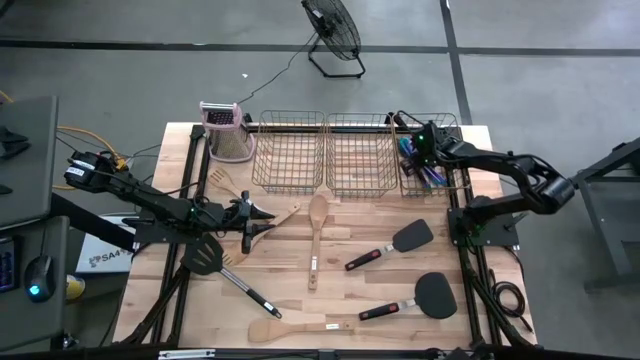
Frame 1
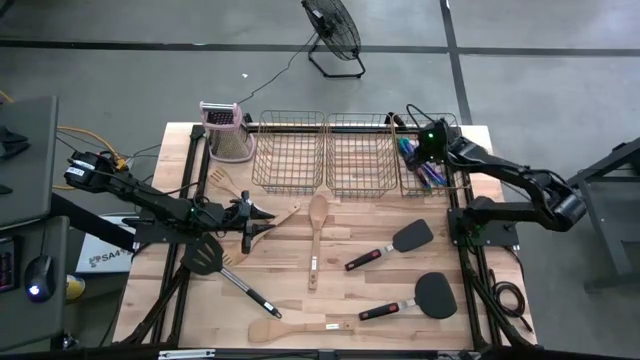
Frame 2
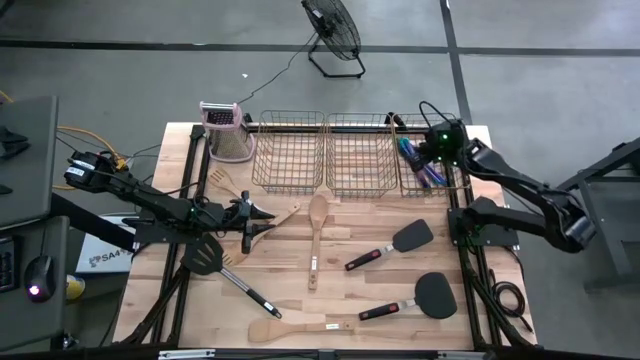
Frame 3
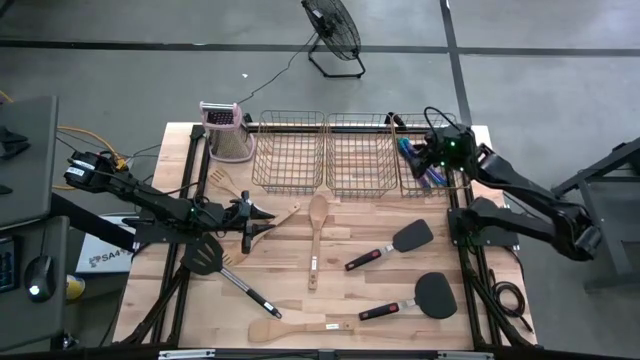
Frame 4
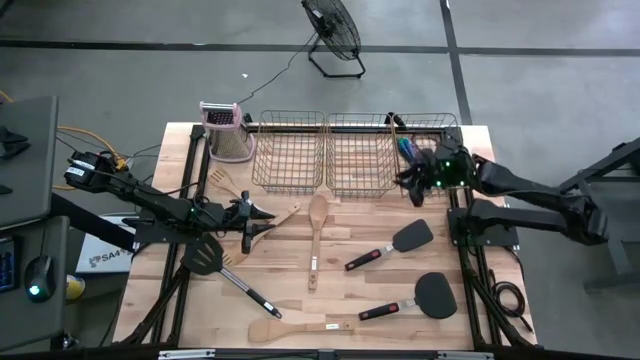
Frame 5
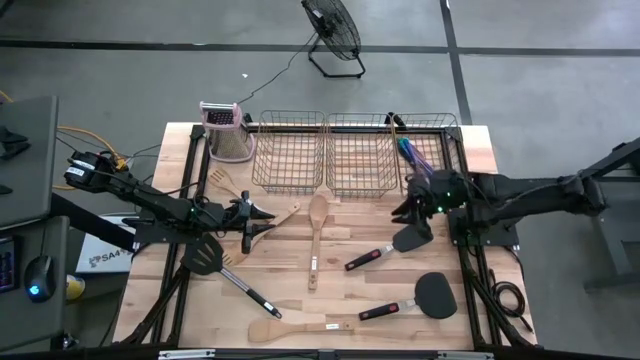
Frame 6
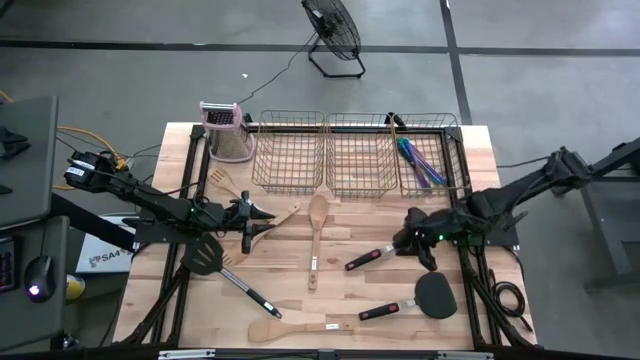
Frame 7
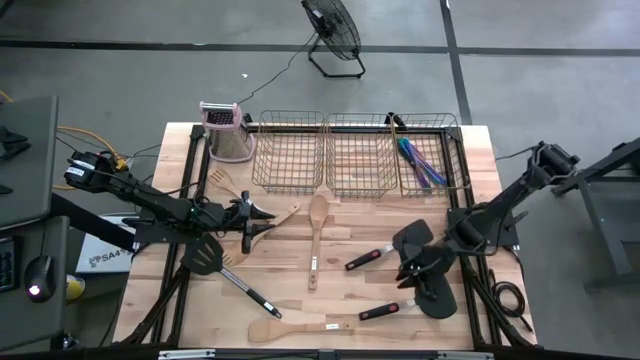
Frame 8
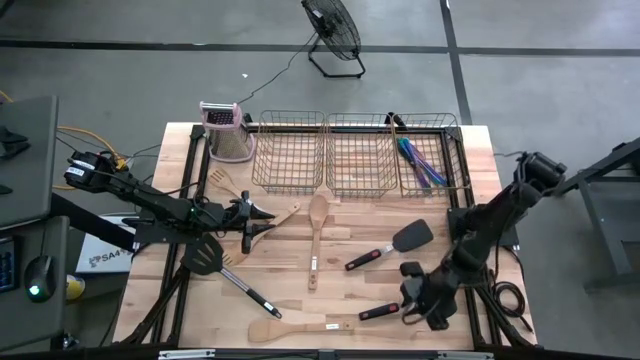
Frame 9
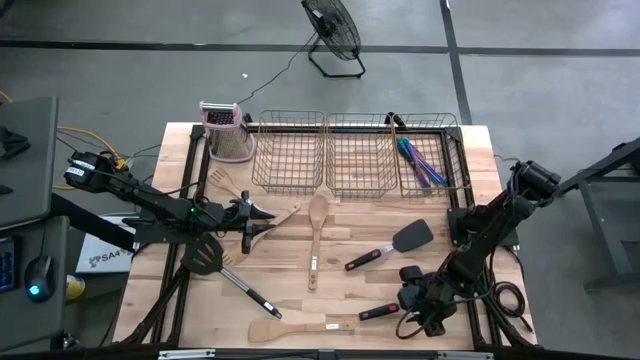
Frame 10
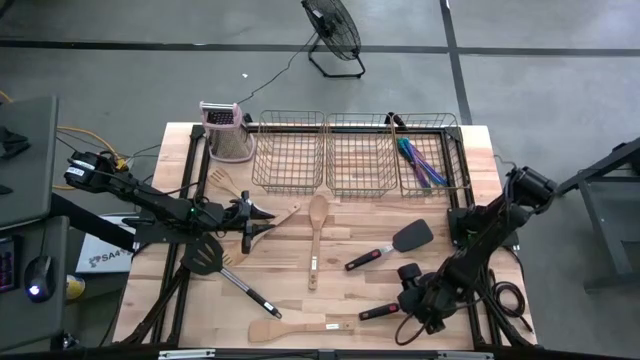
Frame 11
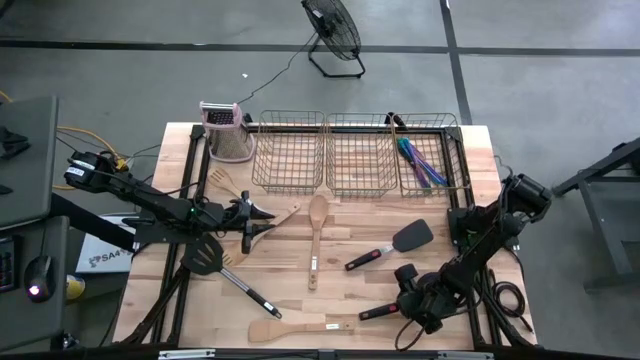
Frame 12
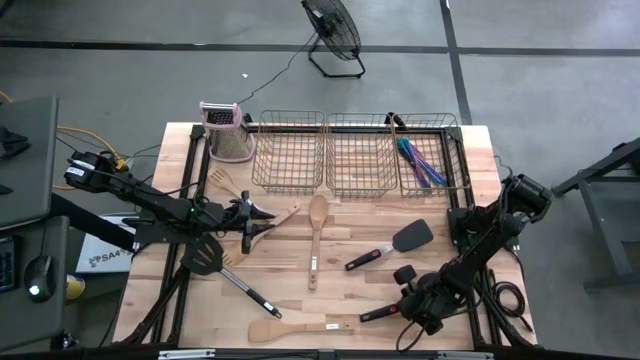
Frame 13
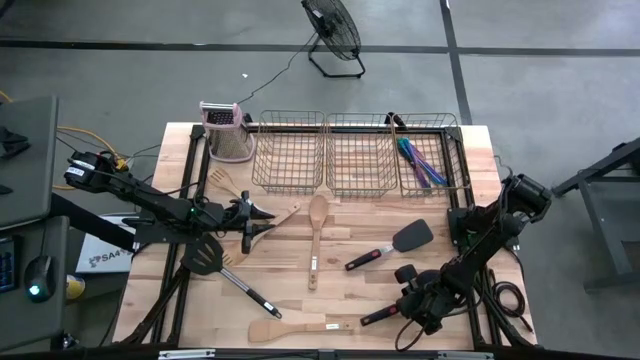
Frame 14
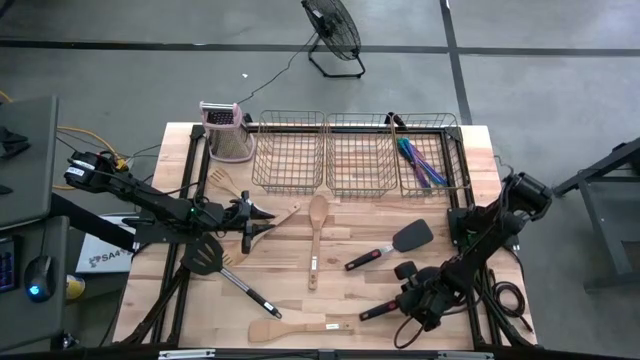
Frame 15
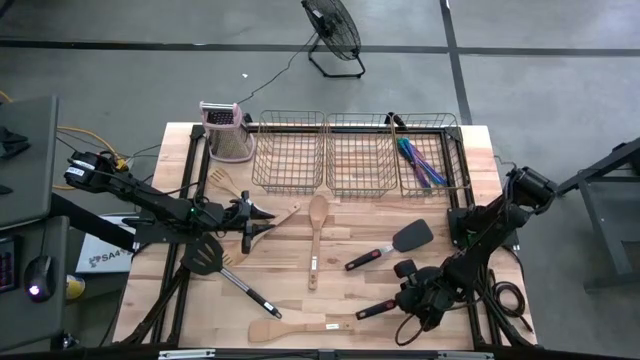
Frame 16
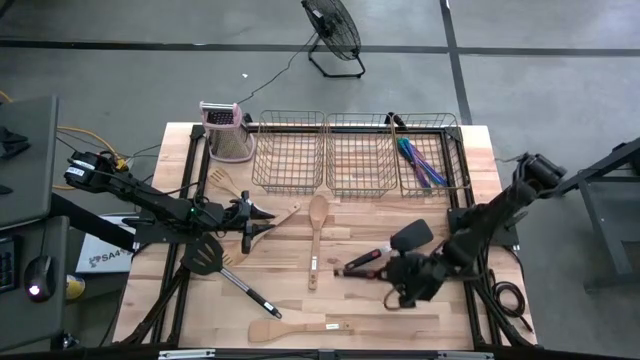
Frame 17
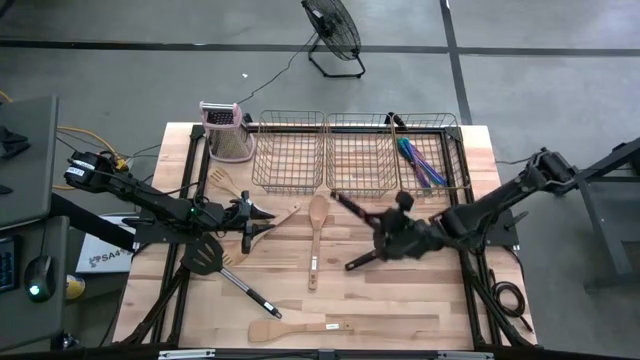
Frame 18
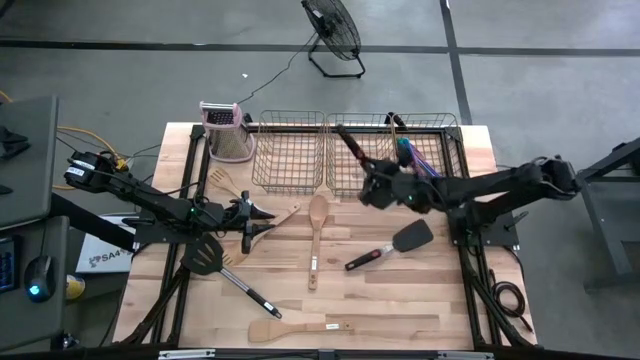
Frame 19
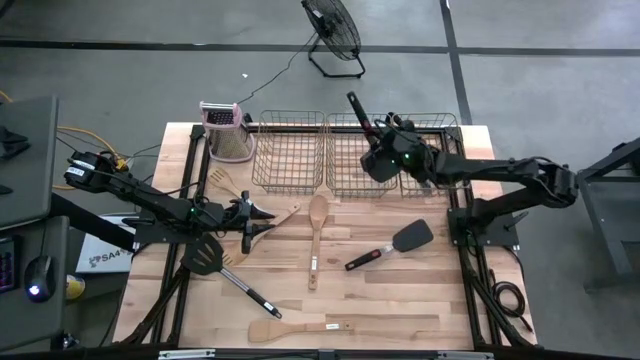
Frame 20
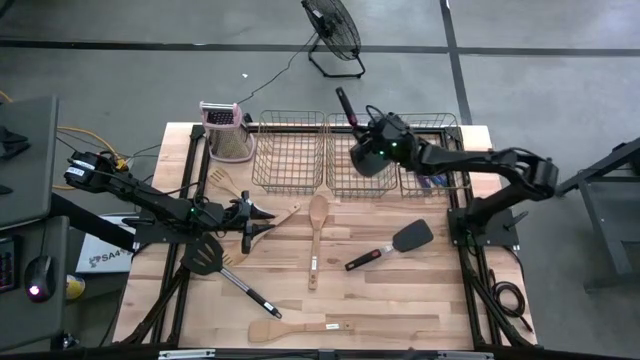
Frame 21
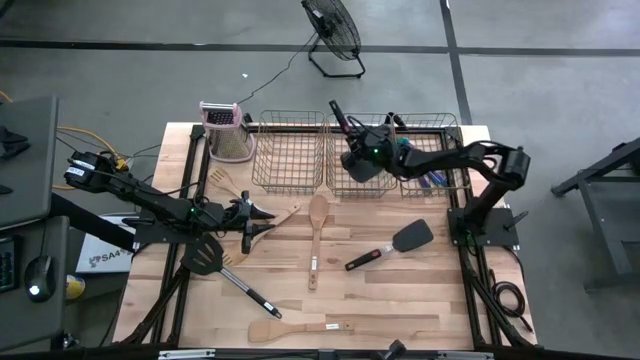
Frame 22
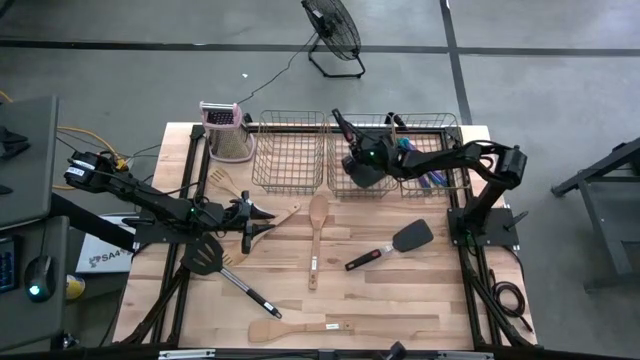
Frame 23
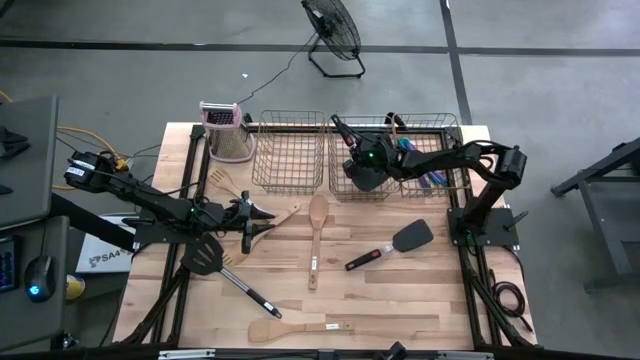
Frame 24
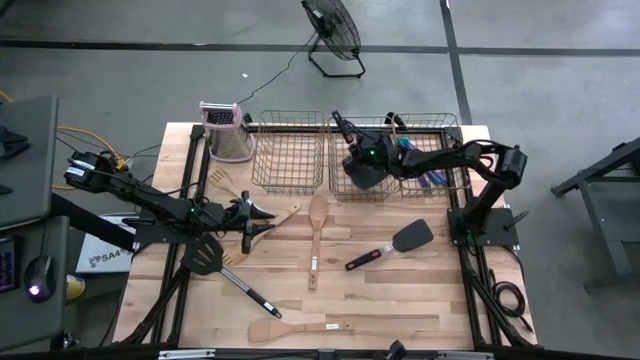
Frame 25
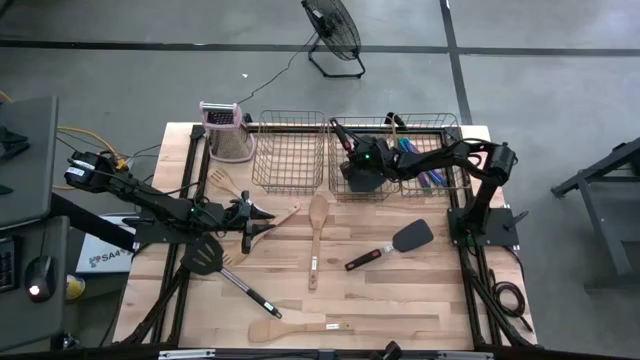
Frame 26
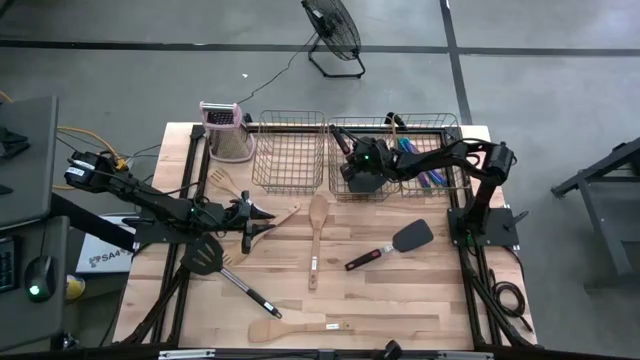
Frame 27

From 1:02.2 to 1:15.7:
Task: Pick & Place Kitchen Items
Put the bottom black turner spatula into the middle mesh basket

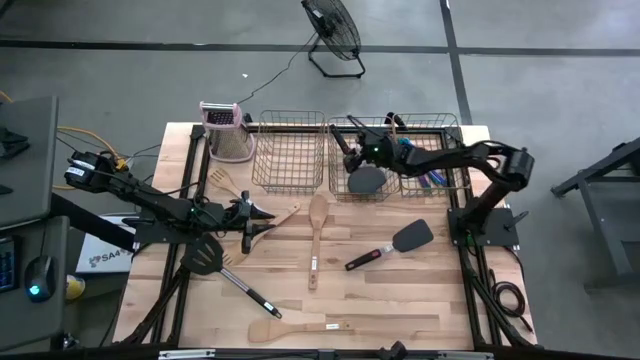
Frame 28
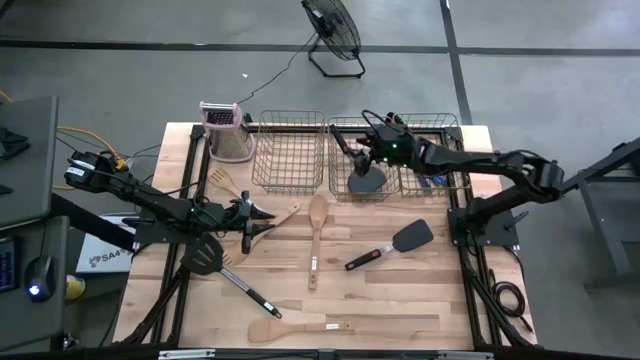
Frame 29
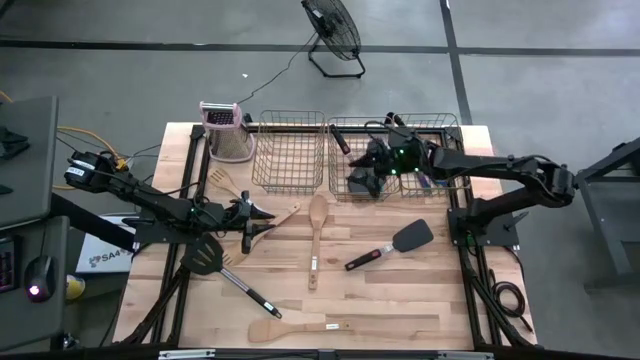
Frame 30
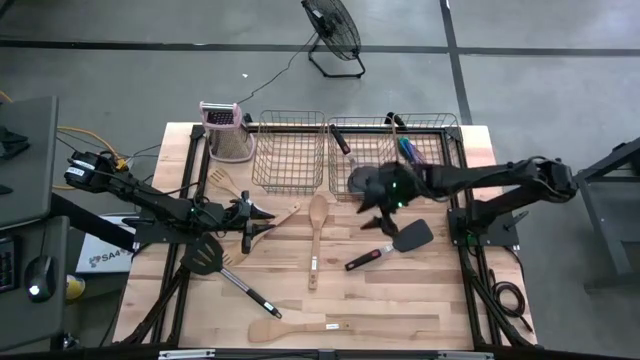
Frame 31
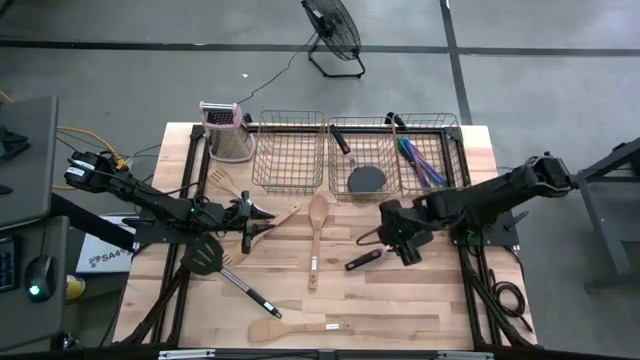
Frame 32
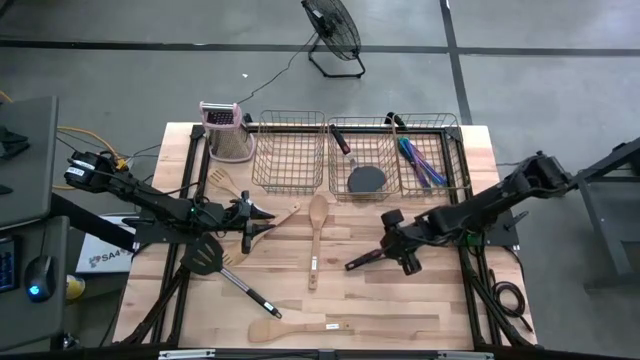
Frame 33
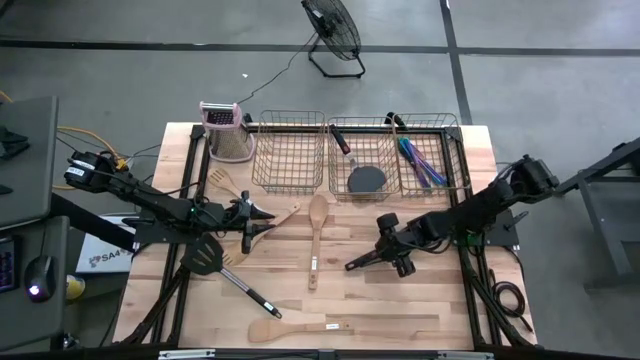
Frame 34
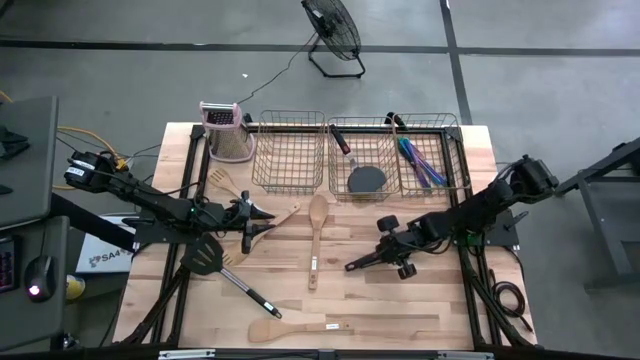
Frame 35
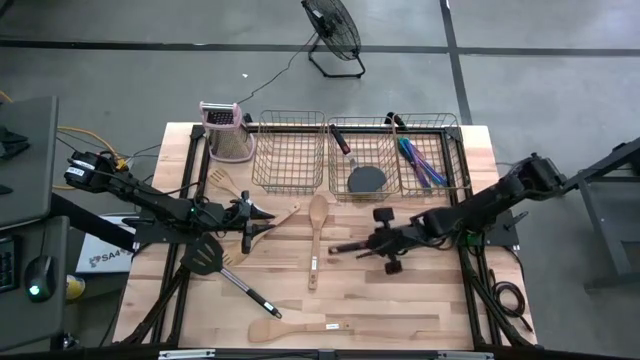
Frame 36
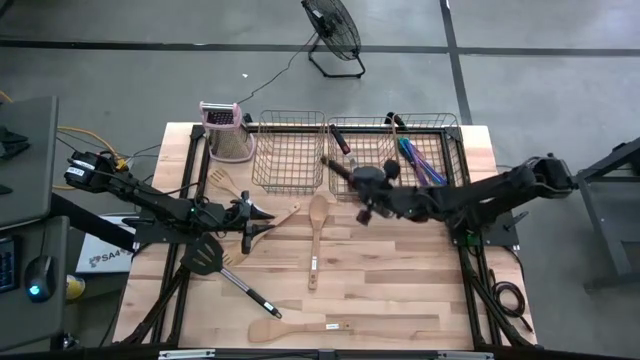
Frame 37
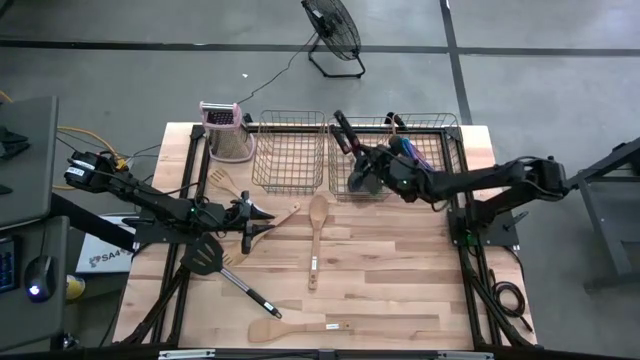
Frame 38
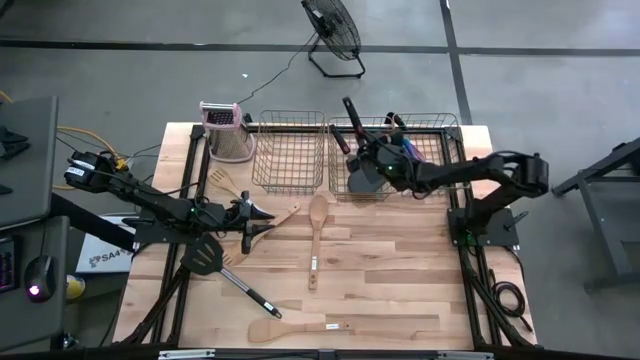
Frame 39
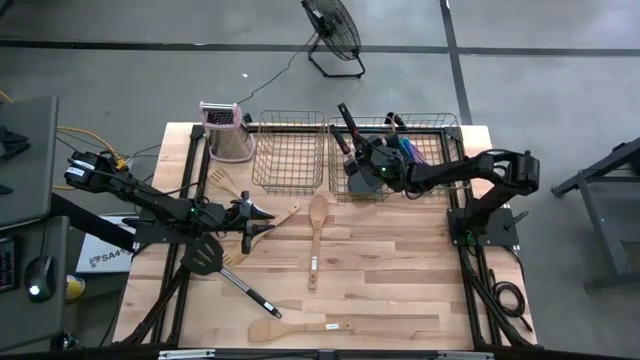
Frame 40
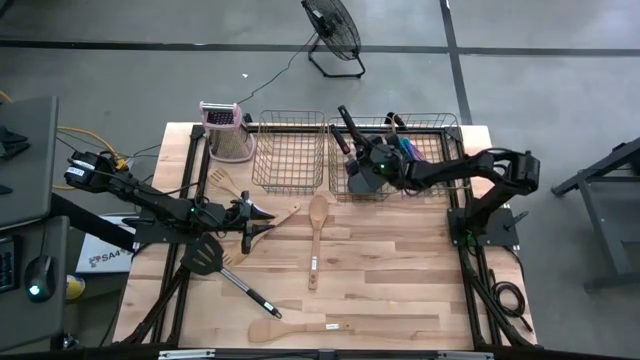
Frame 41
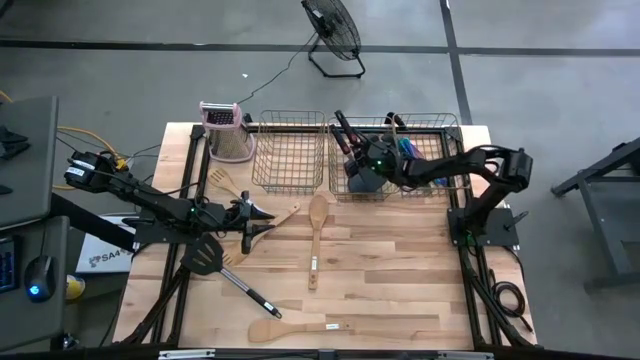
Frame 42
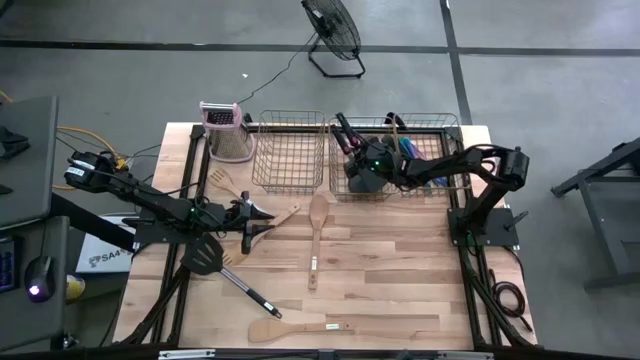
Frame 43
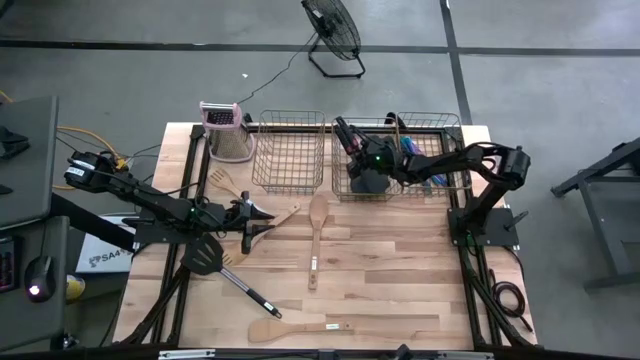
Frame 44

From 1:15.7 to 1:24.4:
Put the black turner spatula into the middle mesh basket
